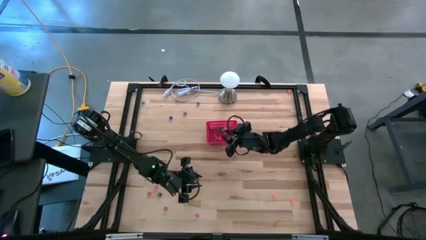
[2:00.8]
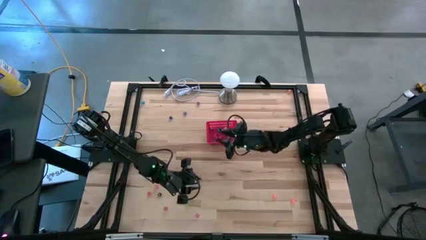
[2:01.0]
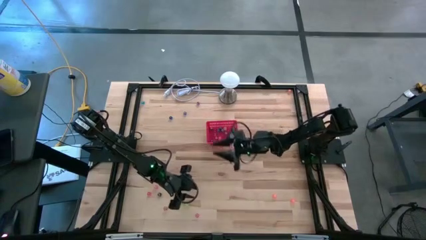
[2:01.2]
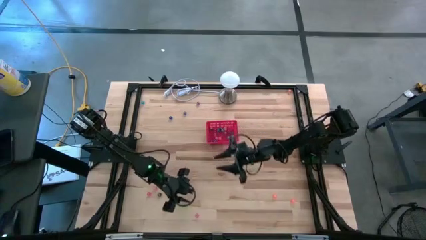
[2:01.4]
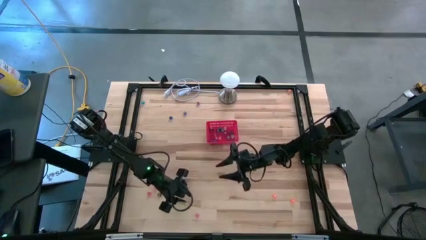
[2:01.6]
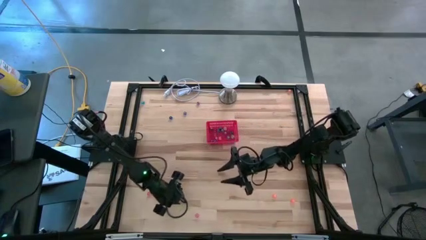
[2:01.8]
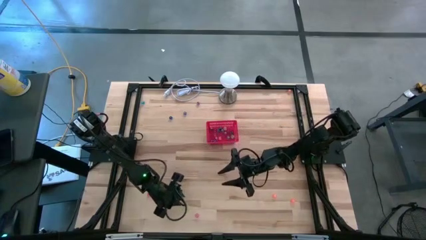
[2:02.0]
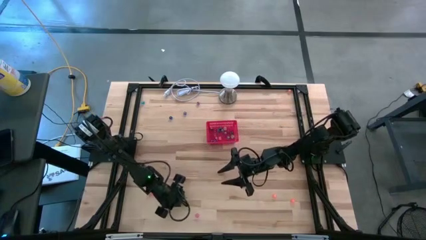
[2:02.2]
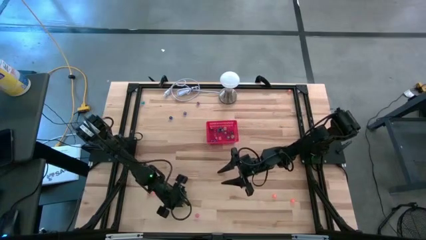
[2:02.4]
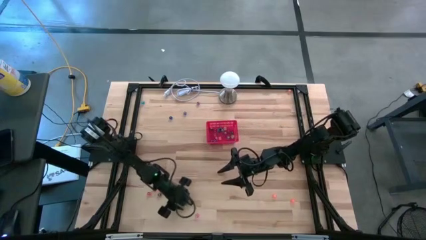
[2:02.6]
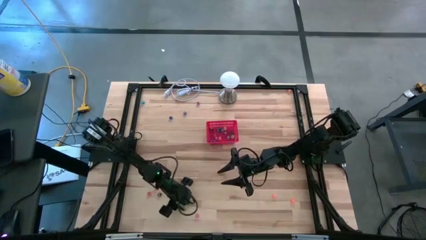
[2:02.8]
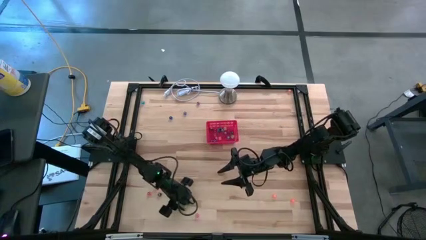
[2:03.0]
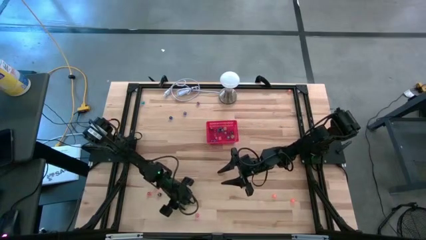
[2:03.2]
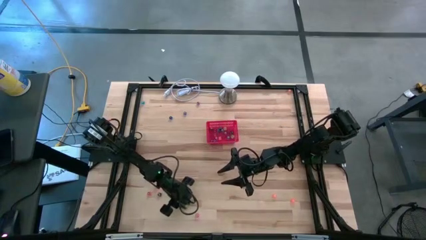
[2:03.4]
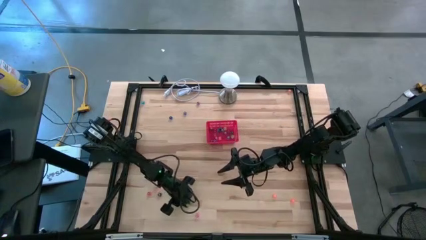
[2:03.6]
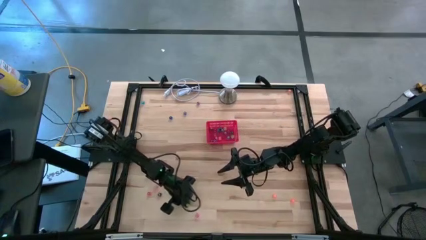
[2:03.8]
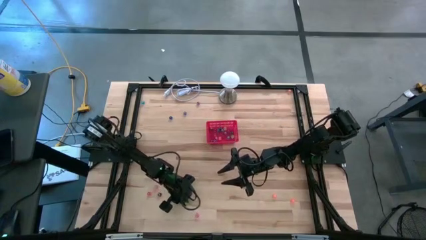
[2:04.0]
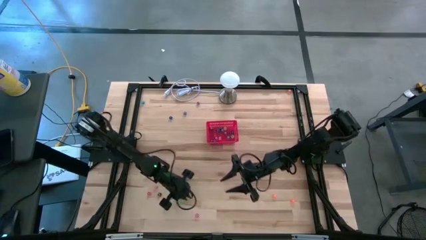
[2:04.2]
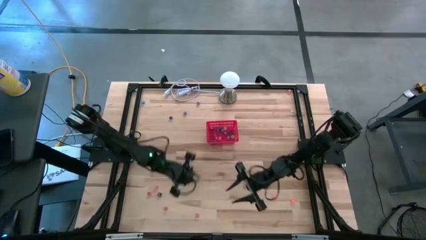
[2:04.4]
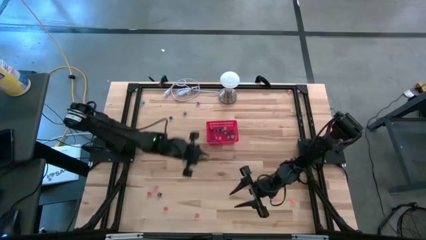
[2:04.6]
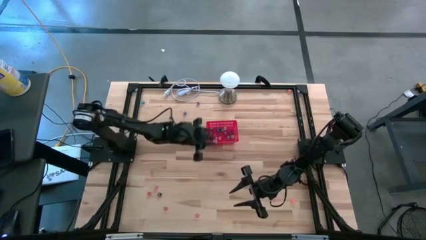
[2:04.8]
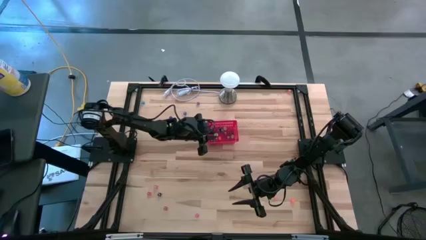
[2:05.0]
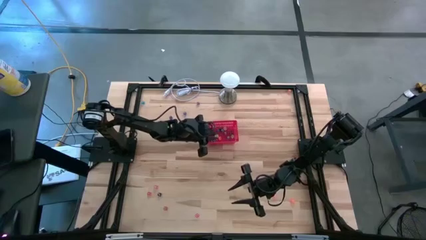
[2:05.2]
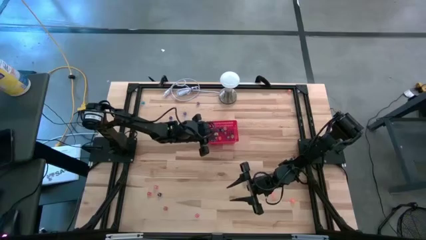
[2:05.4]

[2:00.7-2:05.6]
Task: Pick & Place Dice
Put the light green dice into the bin

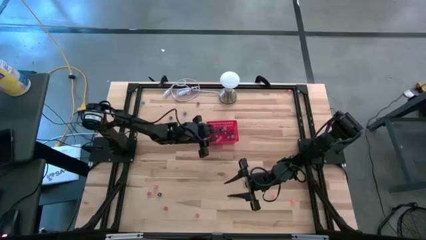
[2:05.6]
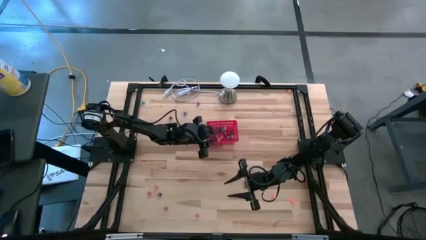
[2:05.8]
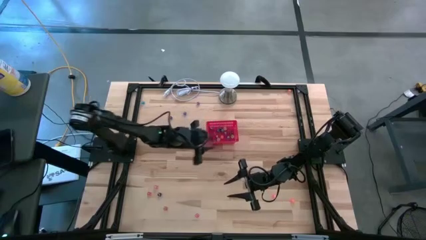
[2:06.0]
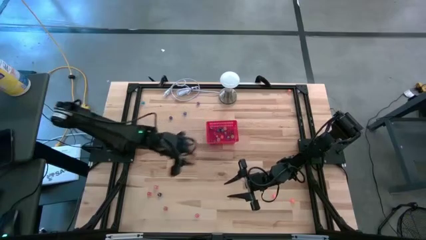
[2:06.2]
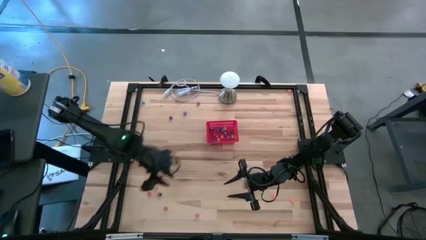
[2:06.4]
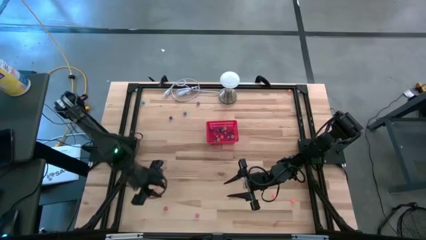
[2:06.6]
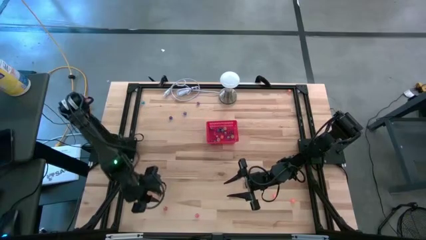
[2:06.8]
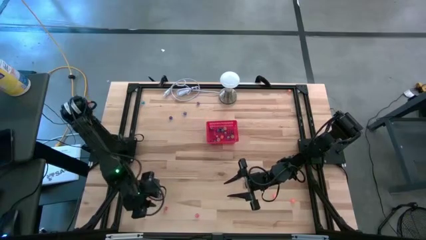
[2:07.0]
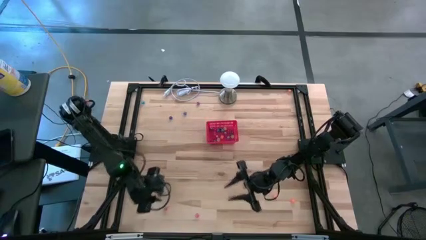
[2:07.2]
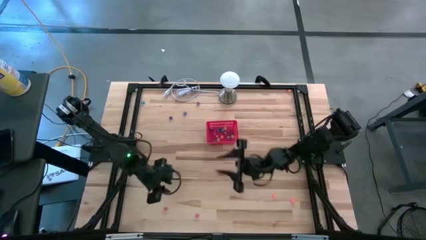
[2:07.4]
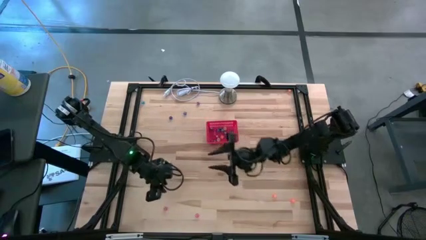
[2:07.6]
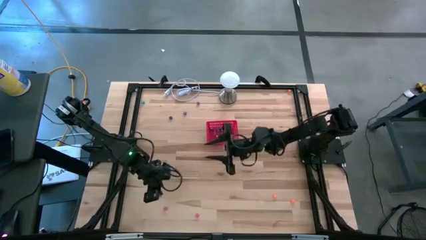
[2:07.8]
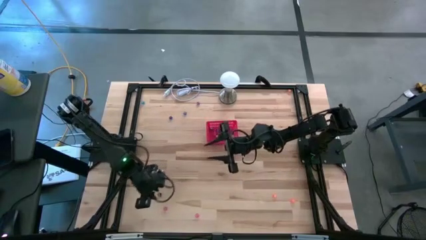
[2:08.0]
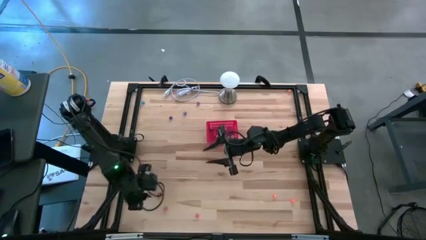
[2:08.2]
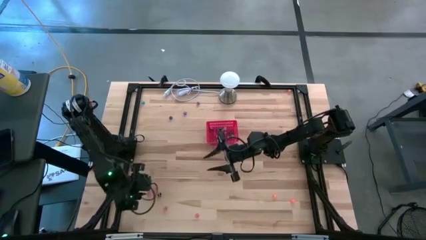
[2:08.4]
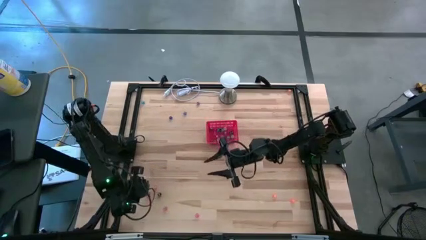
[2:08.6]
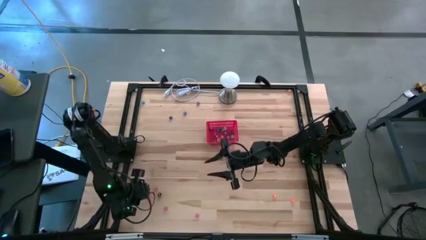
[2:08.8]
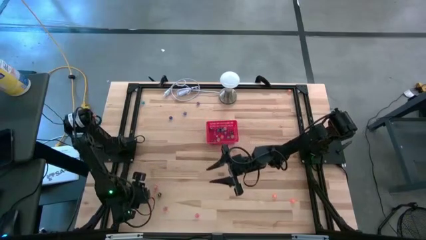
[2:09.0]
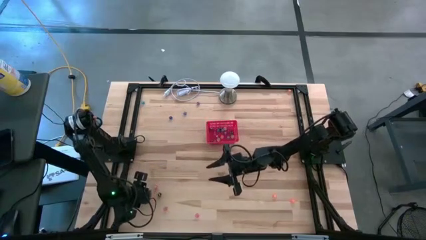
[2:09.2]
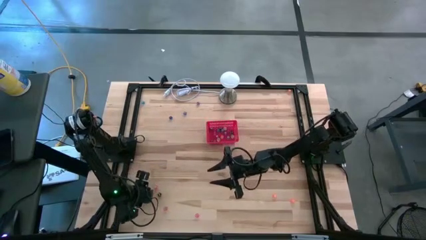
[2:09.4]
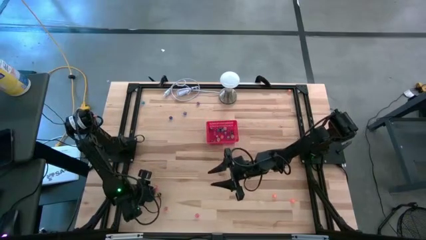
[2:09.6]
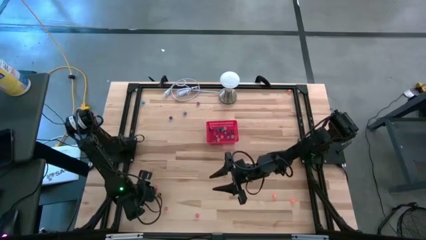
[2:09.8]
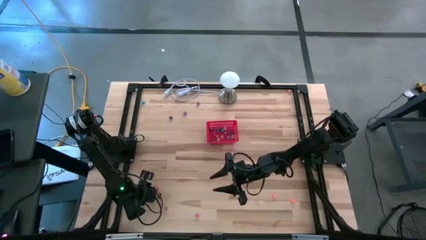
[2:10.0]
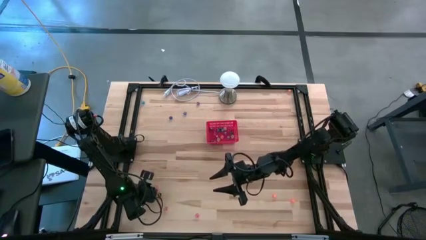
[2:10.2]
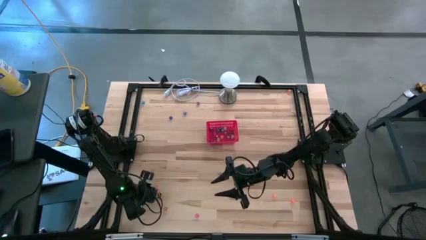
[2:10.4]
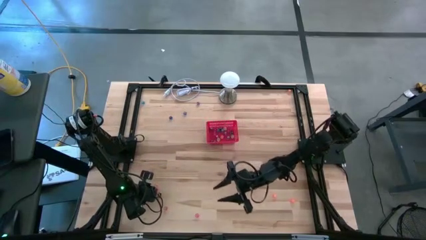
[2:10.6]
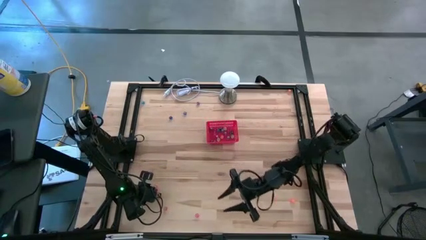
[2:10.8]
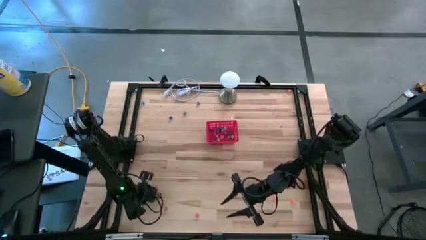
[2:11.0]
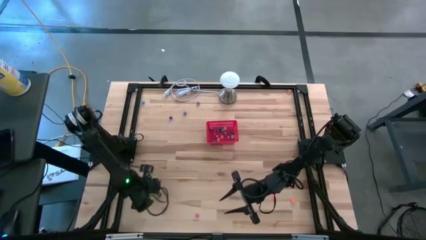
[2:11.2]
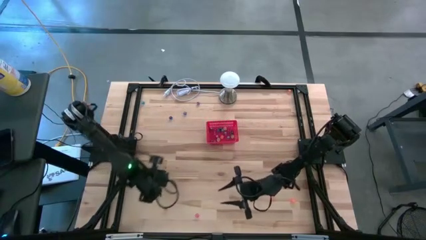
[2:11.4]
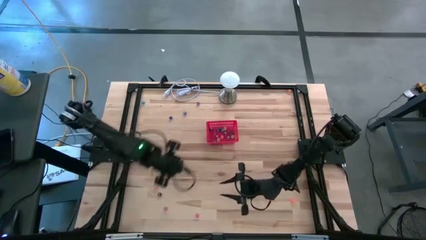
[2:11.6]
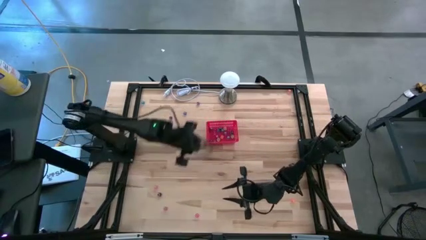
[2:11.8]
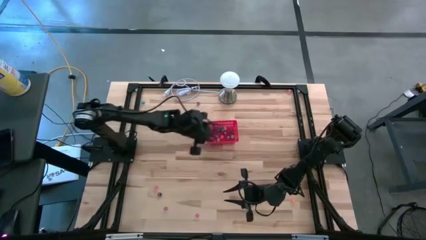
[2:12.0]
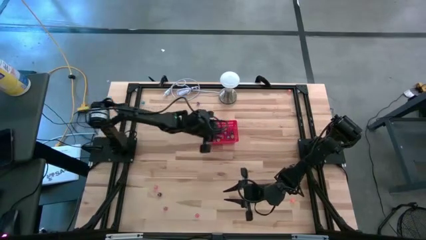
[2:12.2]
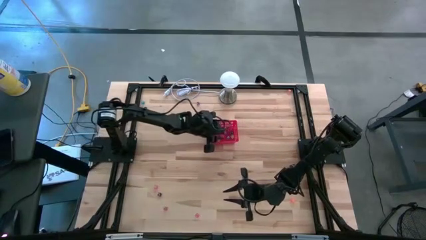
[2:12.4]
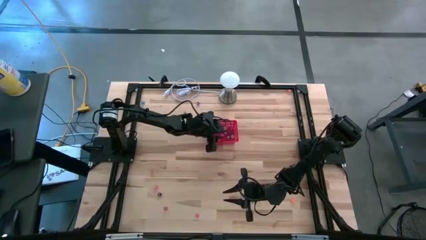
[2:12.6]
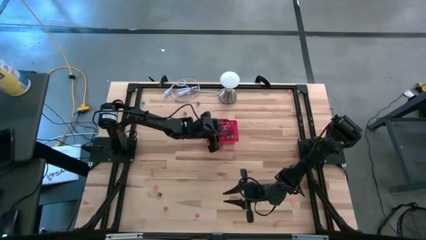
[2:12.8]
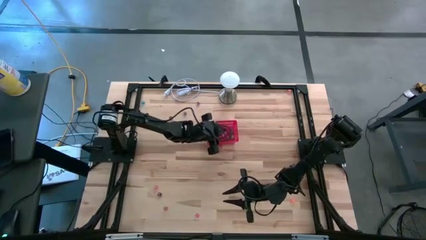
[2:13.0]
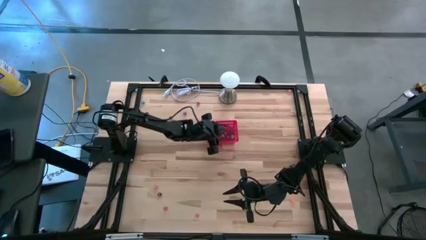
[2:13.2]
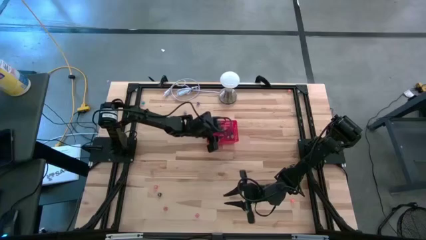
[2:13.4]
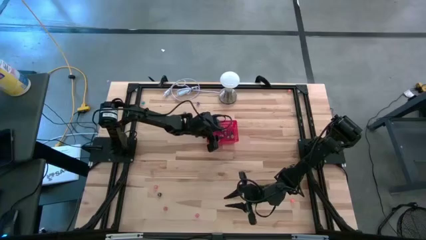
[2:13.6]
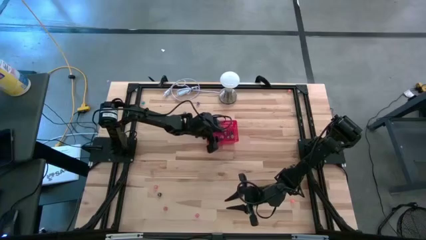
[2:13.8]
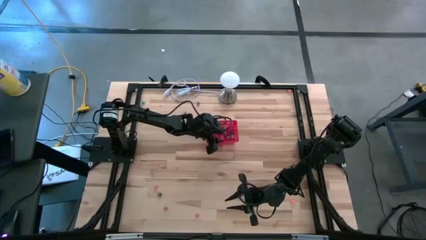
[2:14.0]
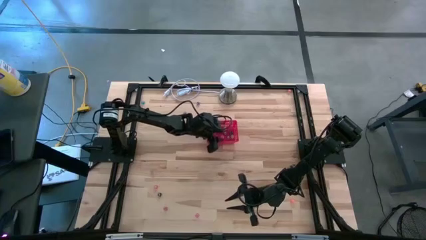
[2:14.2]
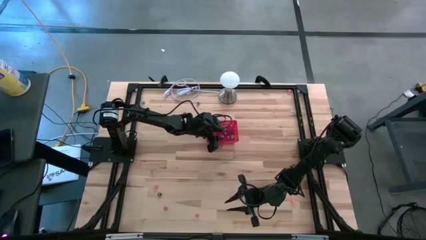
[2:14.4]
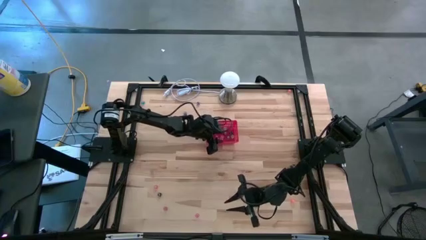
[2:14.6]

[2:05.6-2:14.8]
Put the left pink dice into the bin

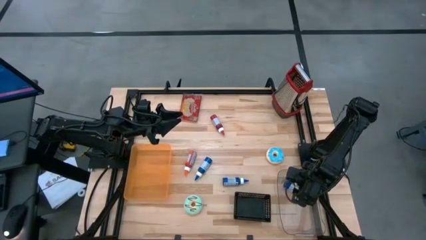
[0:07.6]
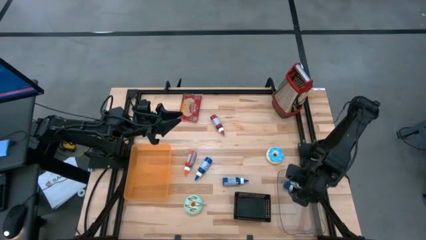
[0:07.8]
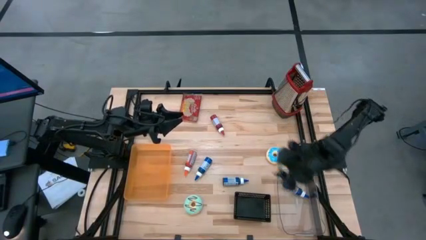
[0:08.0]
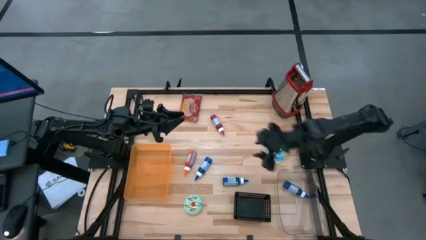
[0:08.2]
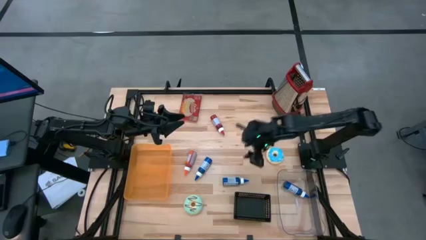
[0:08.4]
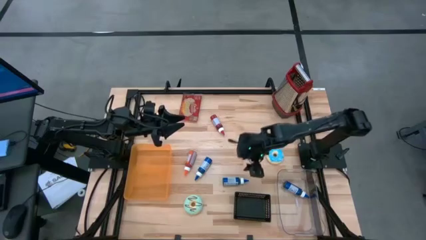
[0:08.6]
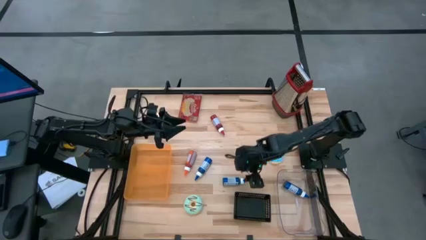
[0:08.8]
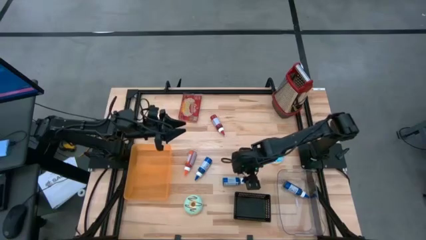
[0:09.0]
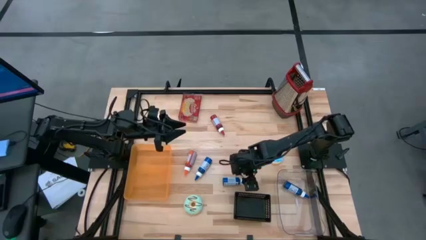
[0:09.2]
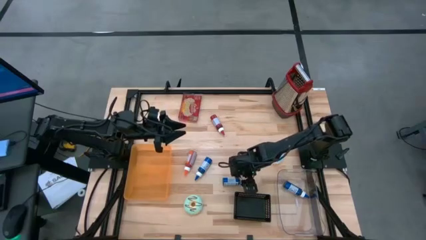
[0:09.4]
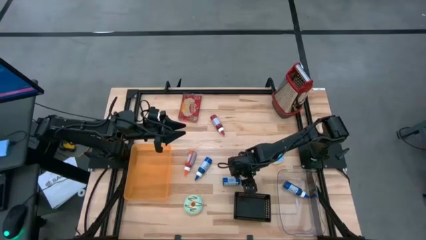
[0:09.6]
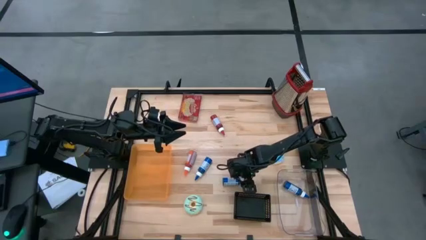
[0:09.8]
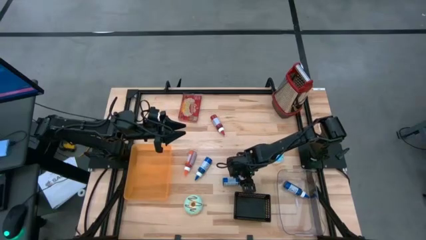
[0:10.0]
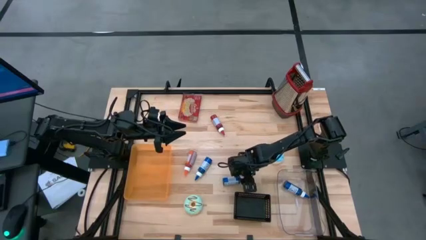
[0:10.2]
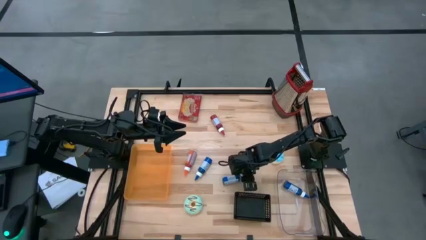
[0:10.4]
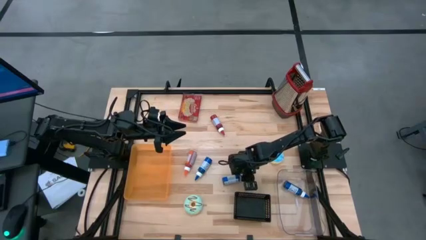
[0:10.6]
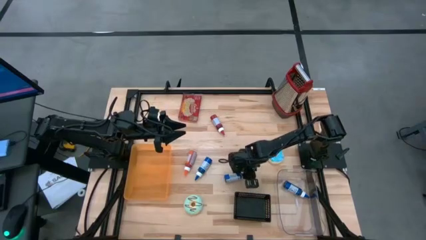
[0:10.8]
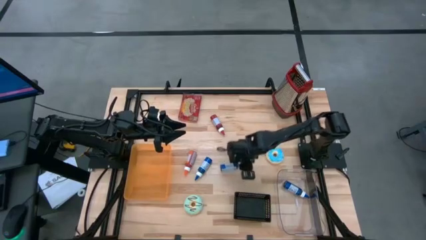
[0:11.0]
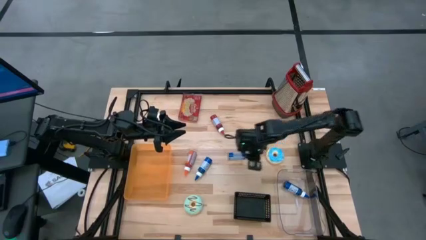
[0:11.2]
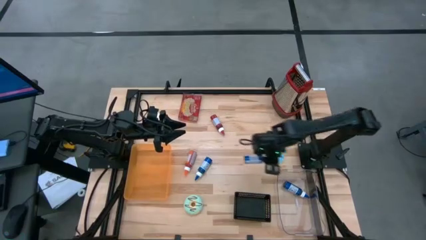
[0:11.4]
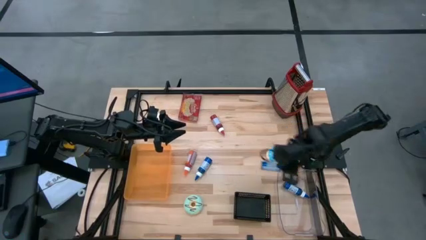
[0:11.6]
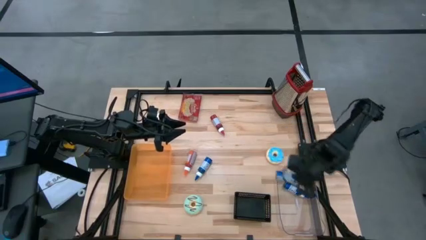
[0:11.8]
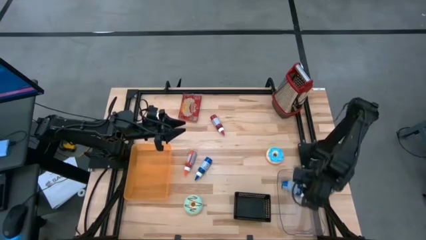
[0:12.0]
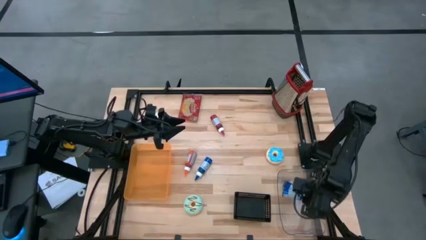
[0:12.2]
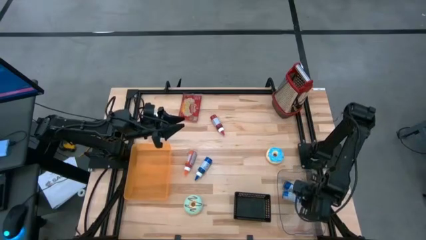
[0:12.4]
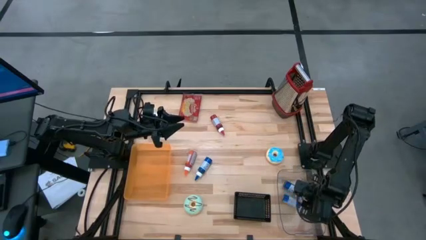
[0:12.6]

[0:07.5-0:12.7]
Task: Pick & Place Food Item
Put the right blue food coloring bottle into the transparent bin
